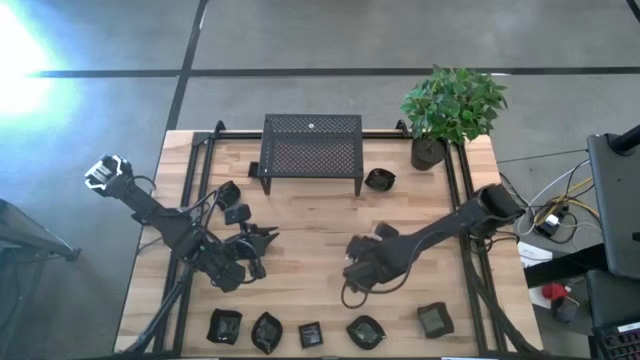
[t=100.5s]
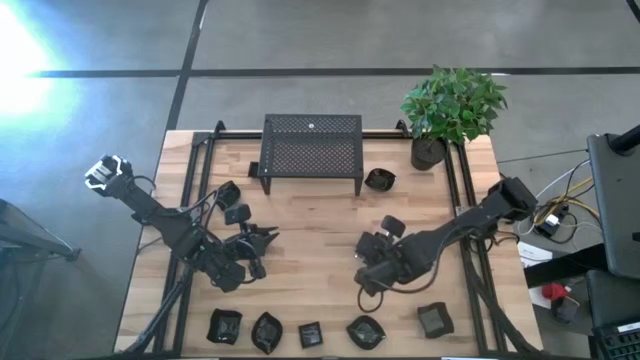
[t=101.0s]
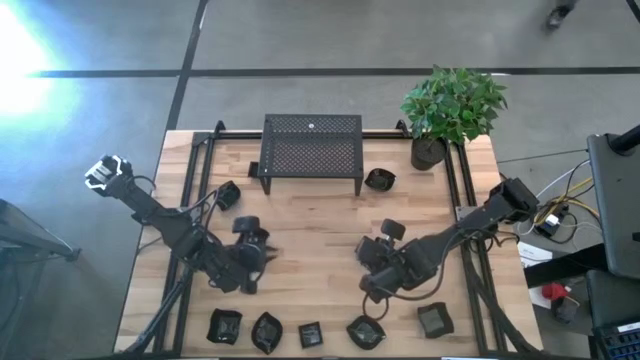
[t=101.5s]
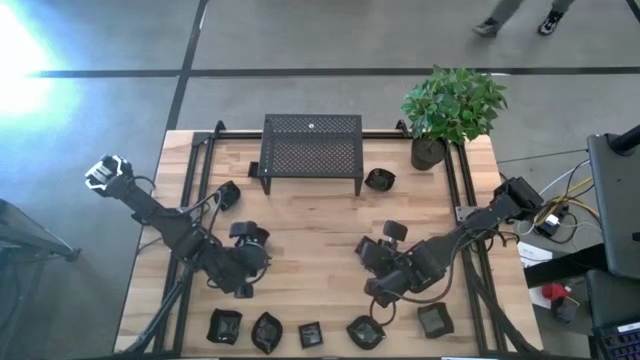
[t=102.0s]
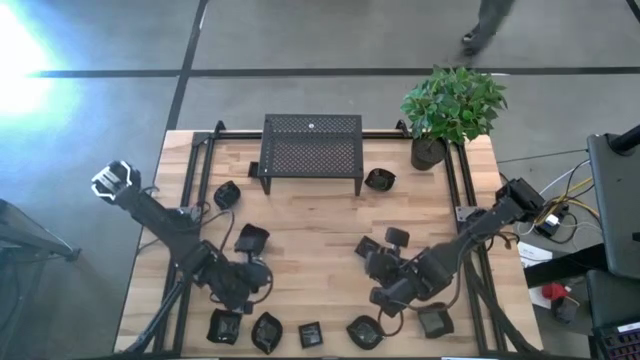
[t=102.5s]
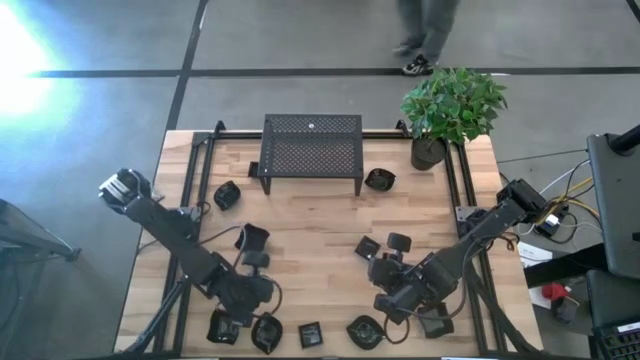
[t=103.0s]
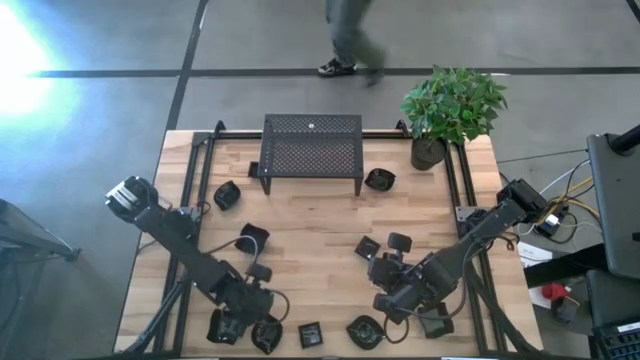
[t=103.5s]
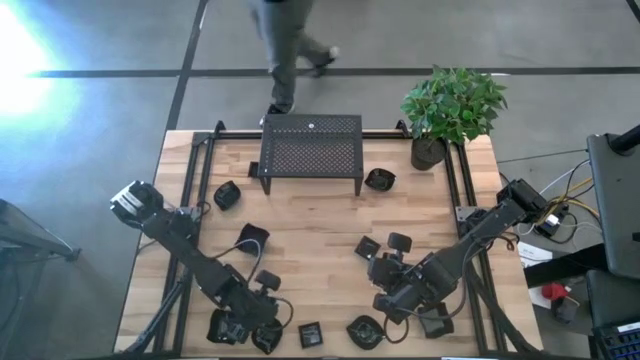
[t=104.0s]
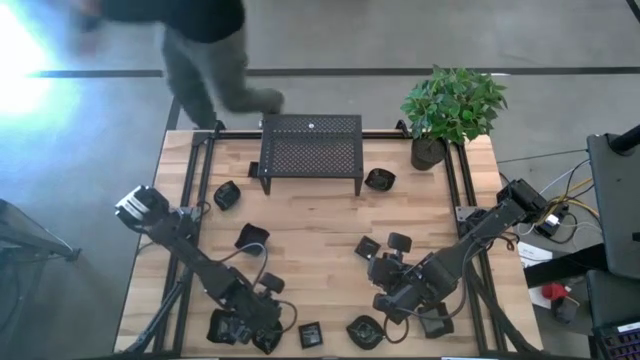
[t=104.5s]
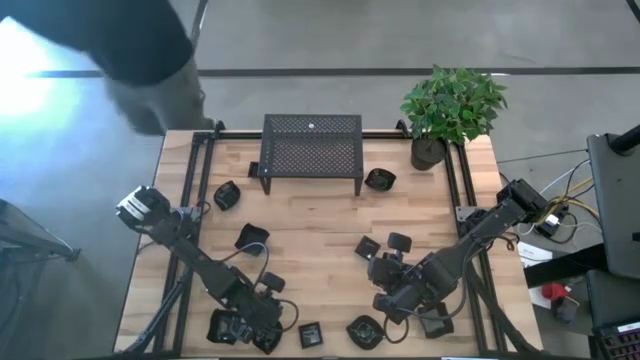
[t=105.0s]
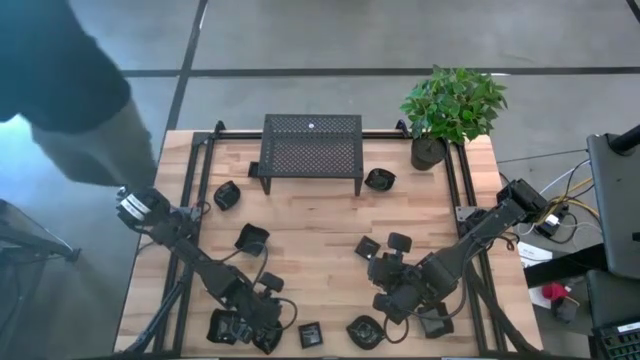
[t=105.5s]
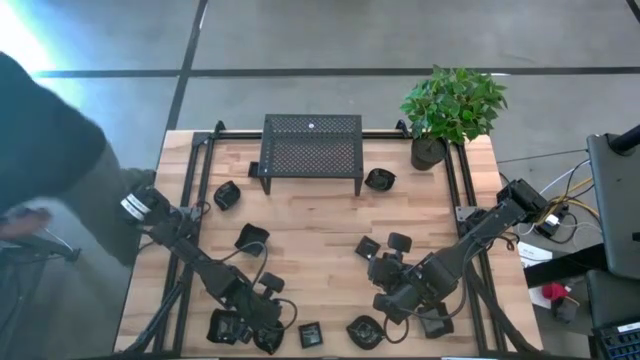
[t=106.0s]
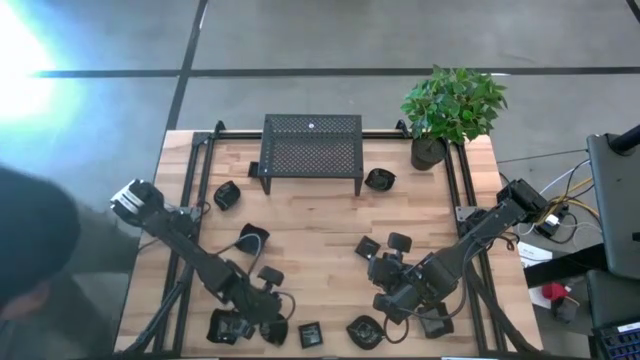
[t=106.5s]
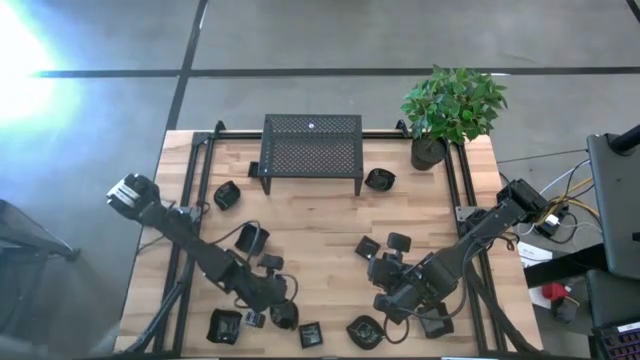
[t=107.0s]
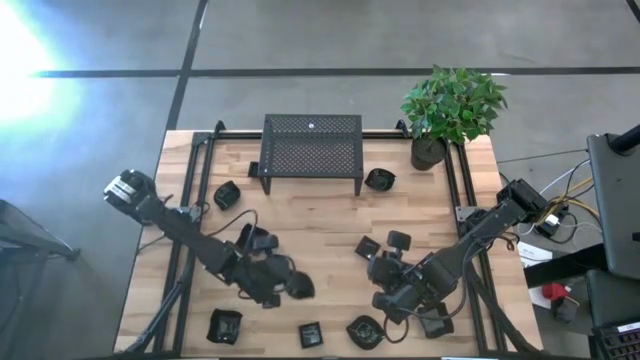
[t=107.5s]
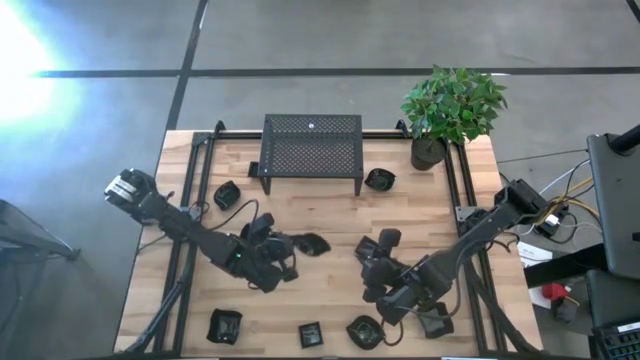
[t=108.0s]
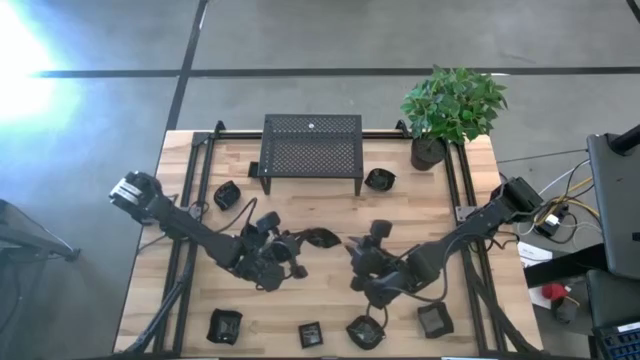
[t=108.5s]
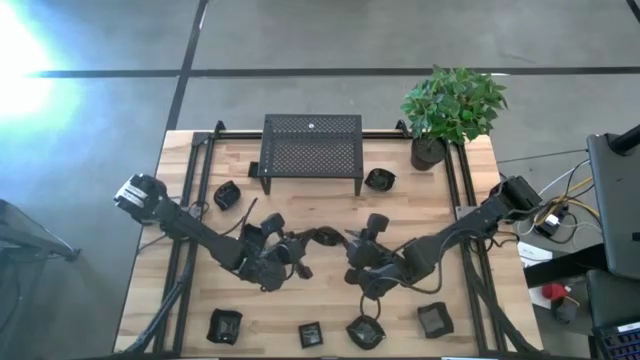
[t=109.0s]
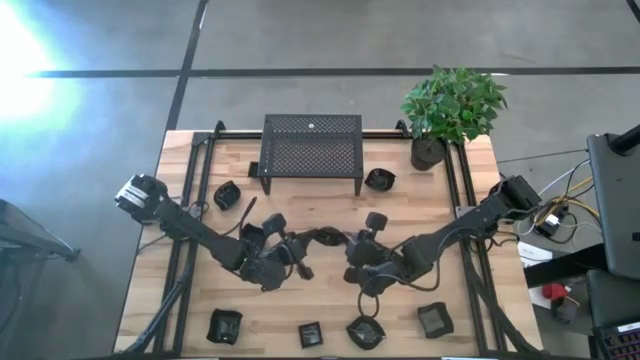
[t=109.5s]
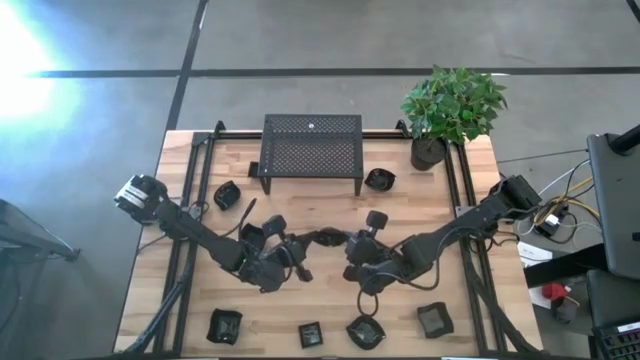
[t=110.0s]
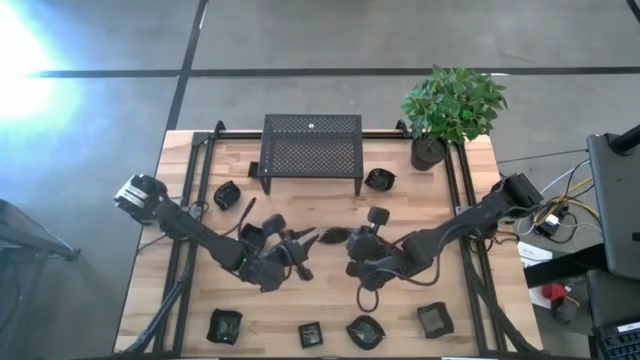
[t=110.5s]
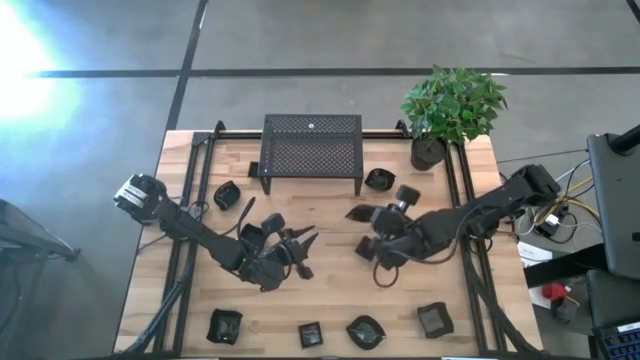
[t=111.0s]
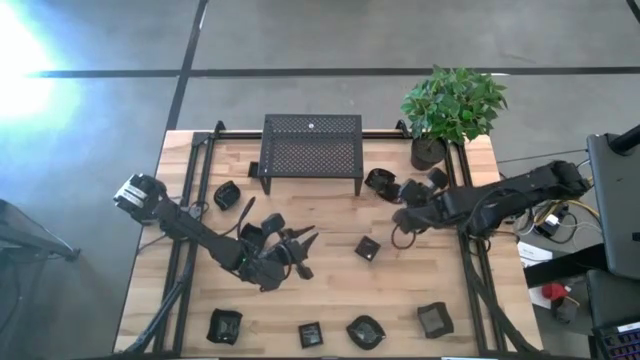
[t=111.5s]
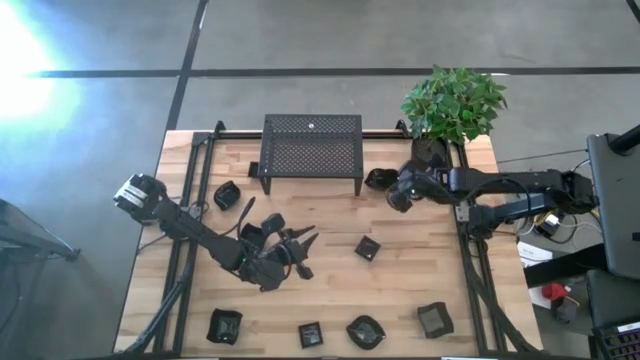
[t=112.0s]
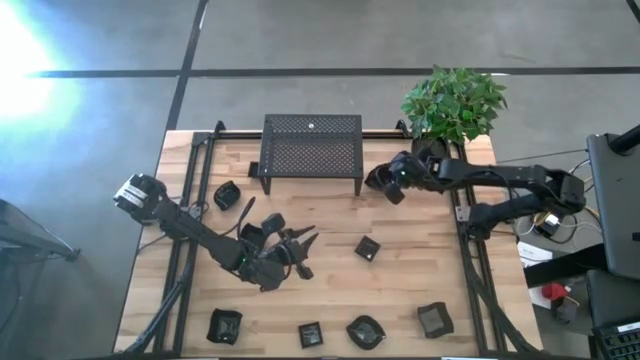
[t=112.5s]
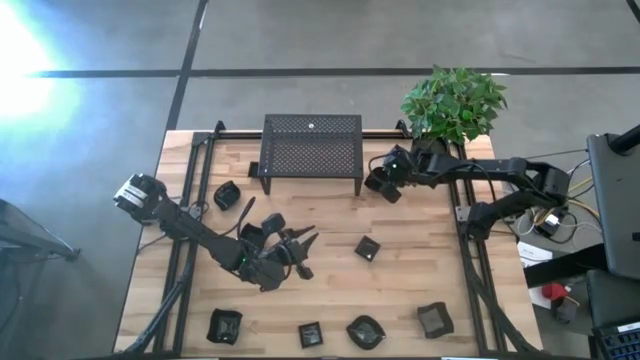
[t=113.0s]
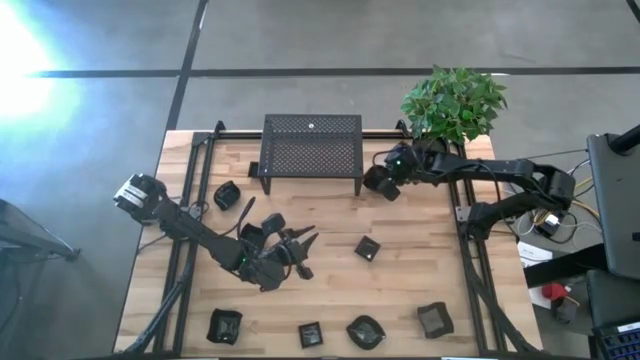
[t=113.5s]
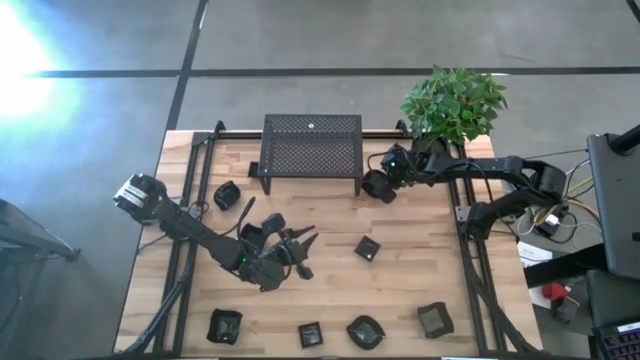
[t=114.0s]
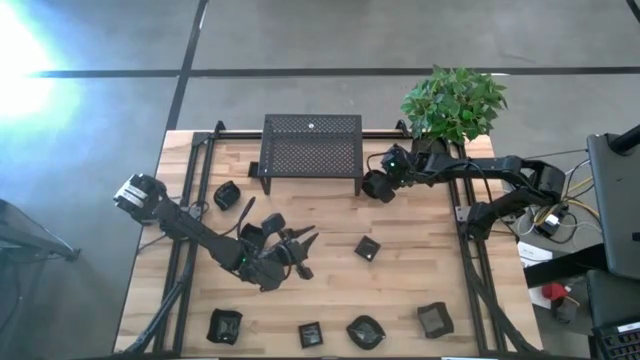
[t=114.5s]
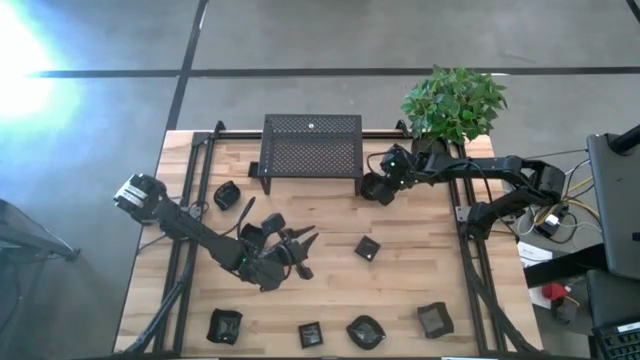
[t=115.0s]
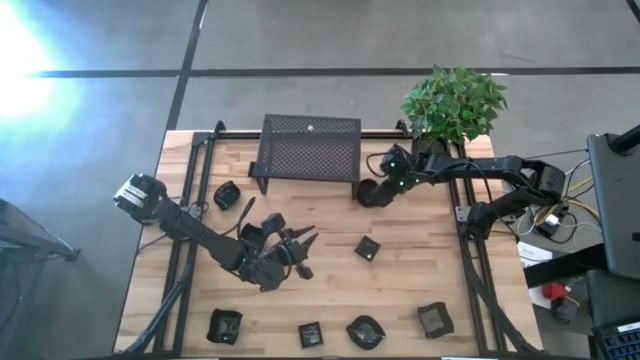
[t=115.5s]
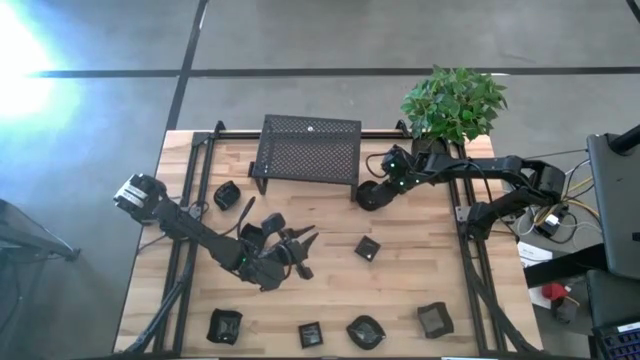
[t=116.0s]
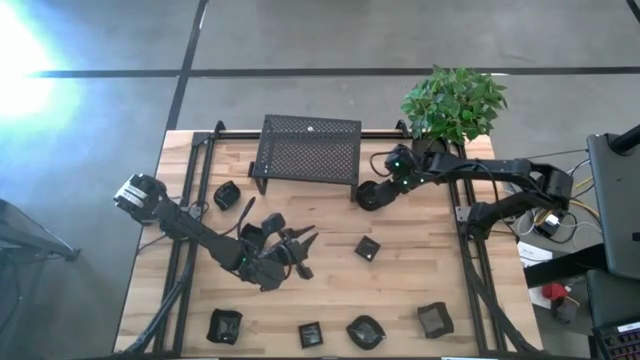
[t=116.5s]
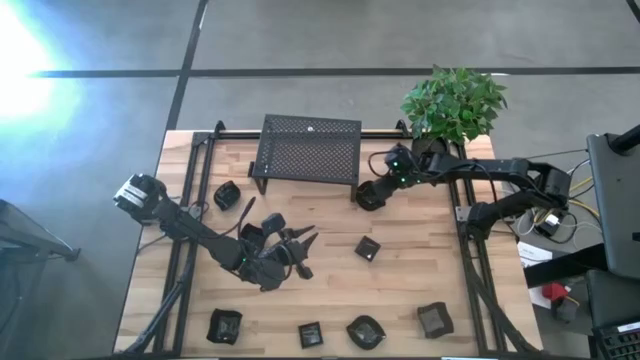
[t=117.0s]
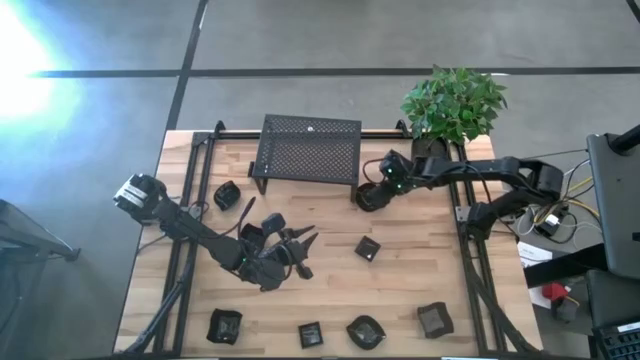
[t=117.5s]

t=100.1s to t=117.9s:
Task: Pick & Place Mini shaped plates
Stack the black leaf shaped plate on top of the other black leaf shaped plate

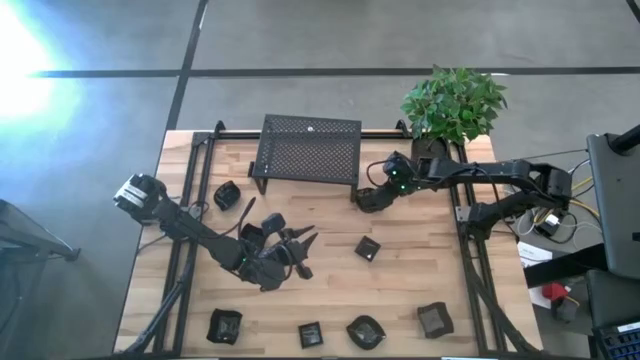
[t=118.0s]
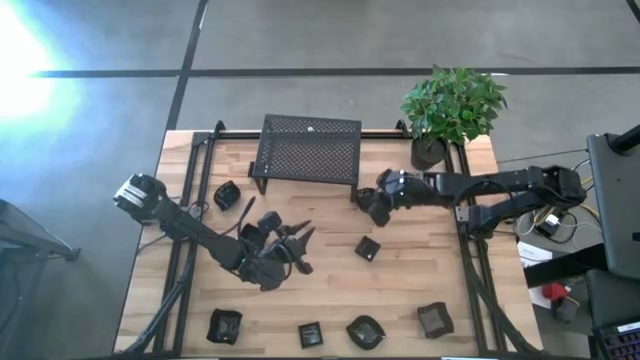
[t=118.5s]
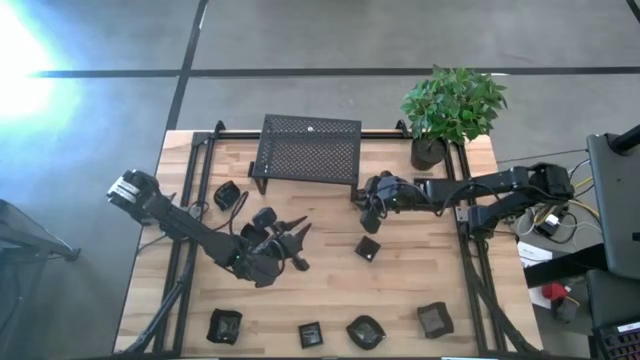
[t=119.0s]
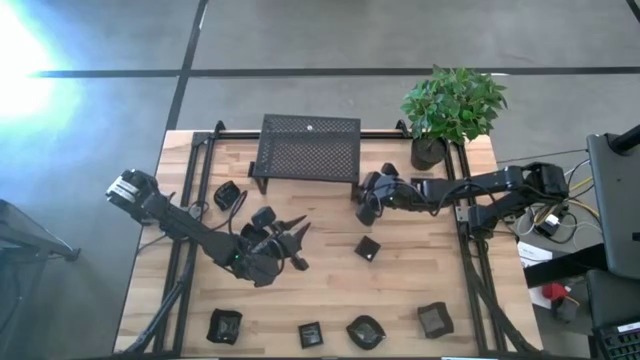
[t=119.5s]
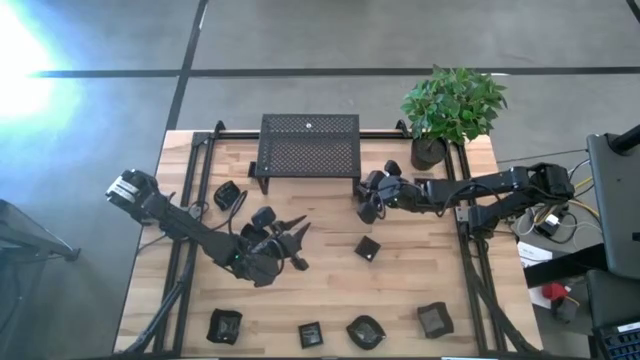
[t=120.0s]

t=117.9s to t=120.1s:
Adjust the shelf

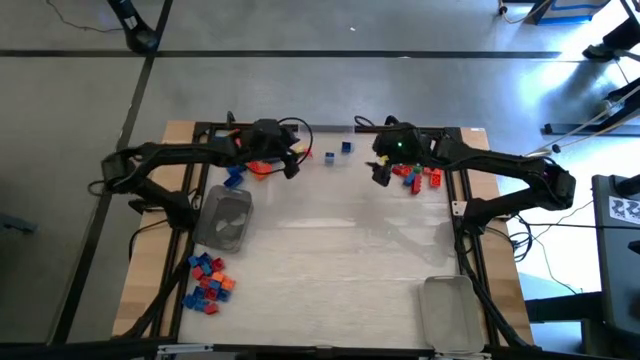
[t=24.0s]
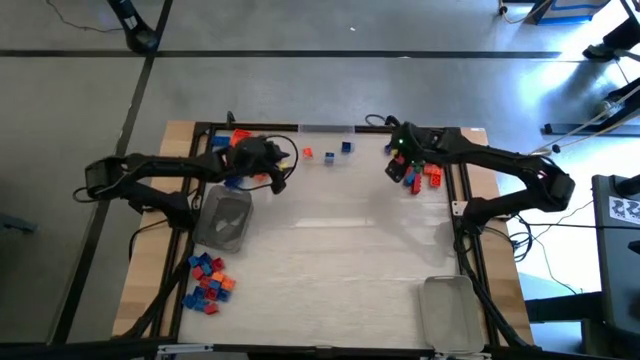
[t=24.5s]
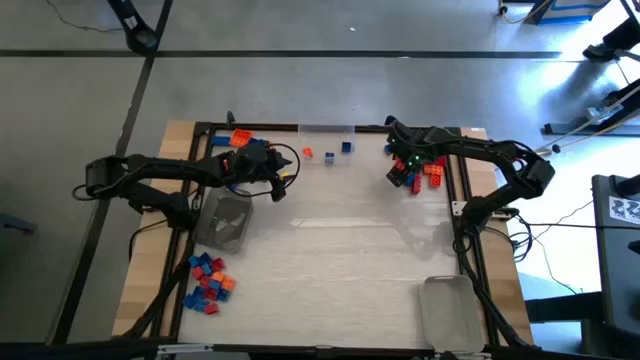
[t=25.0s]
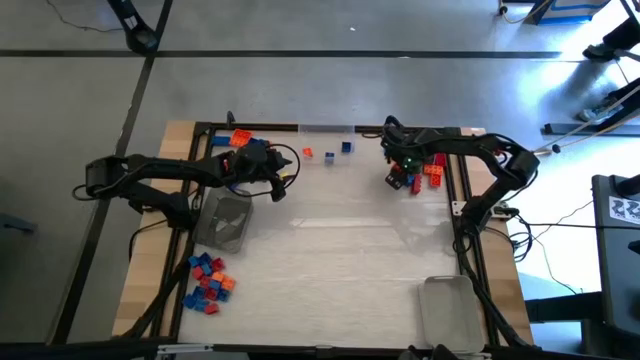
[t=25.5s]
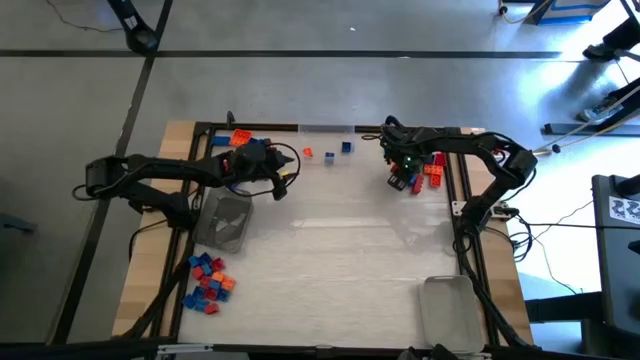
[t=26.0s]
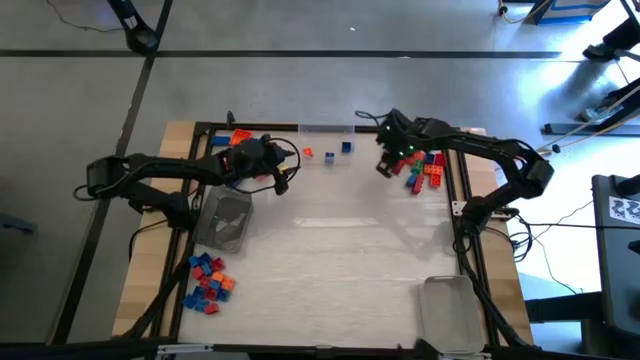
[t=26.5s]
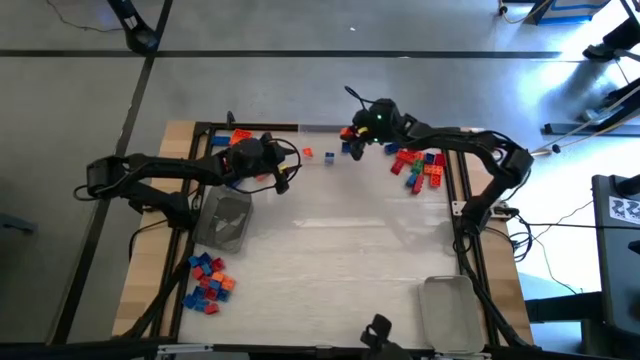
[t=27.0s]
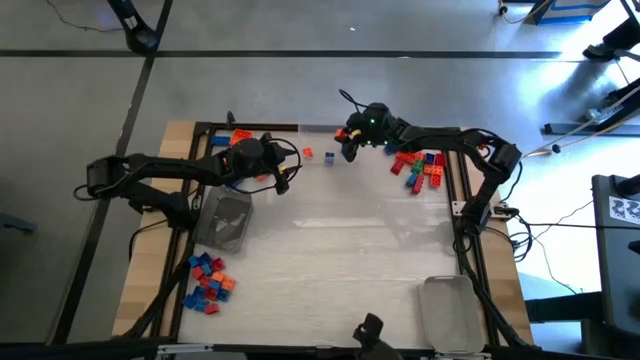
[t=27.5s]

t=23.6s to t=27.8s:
Task: Sort blocks by size
Put the orange 4 stud game piece into the transparent bin
